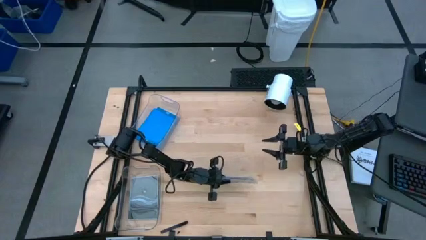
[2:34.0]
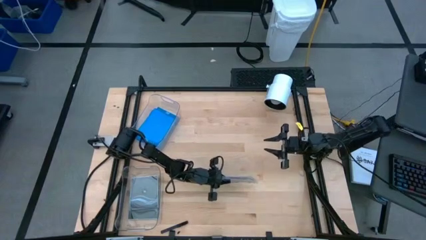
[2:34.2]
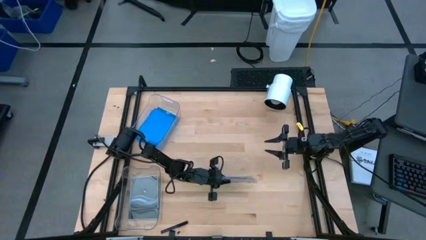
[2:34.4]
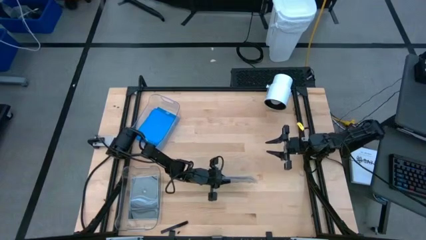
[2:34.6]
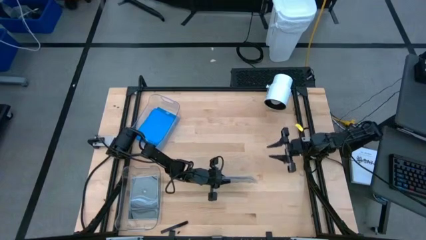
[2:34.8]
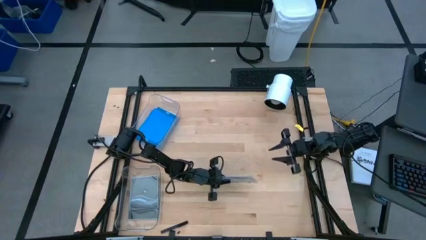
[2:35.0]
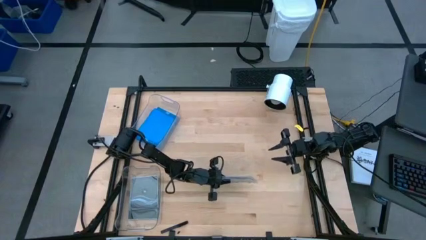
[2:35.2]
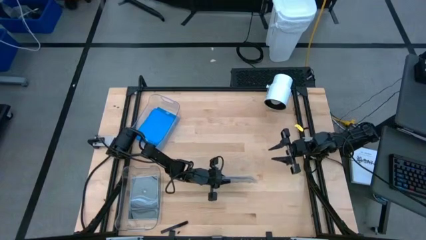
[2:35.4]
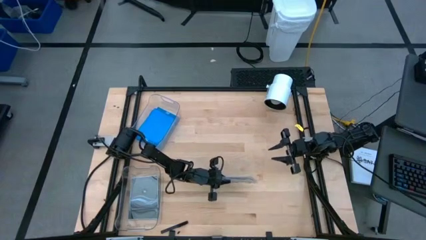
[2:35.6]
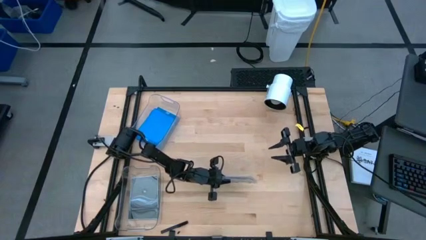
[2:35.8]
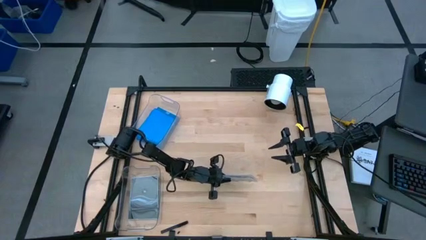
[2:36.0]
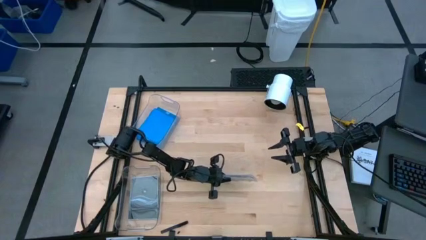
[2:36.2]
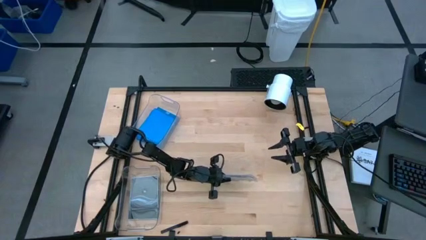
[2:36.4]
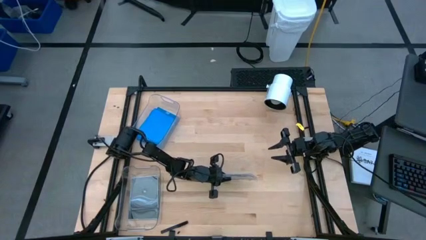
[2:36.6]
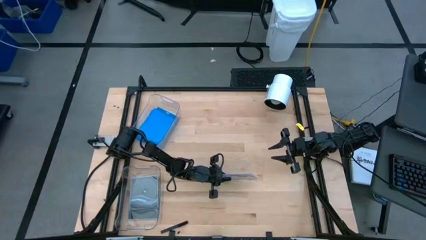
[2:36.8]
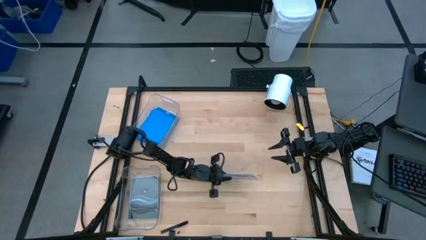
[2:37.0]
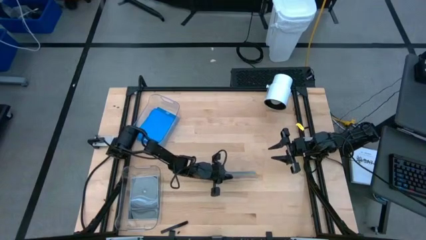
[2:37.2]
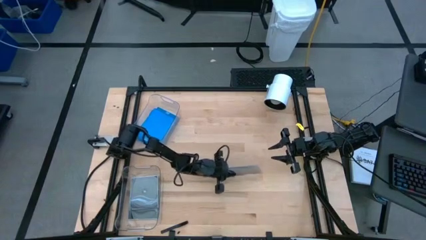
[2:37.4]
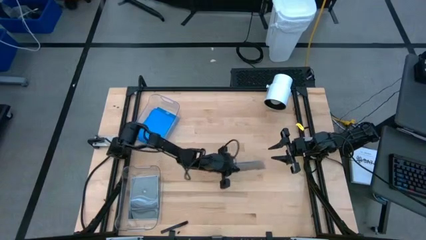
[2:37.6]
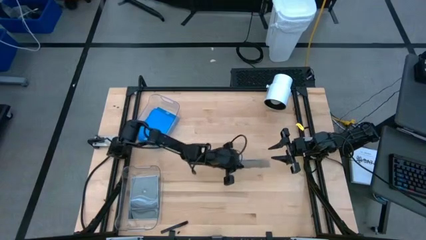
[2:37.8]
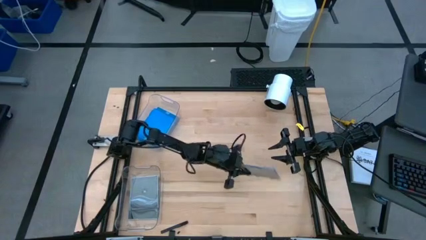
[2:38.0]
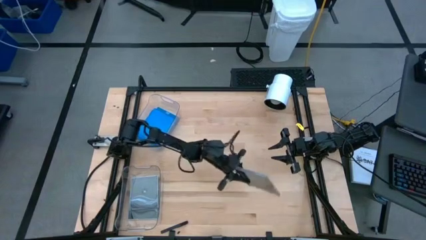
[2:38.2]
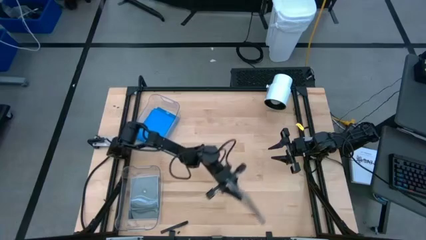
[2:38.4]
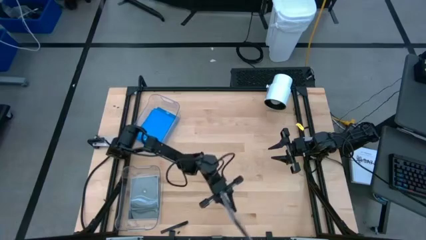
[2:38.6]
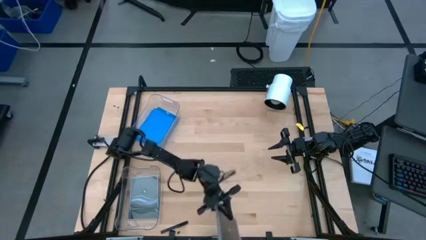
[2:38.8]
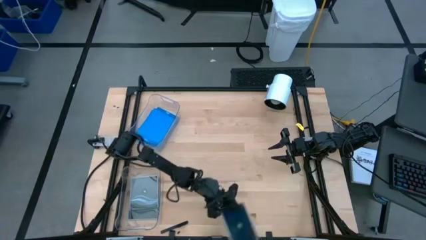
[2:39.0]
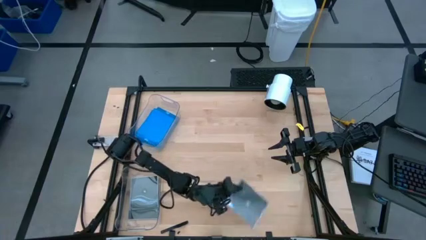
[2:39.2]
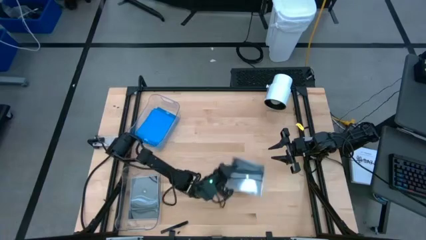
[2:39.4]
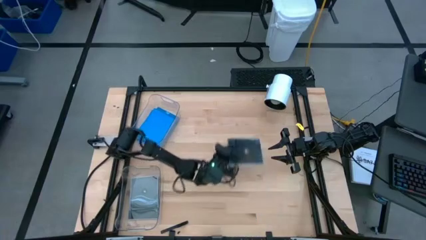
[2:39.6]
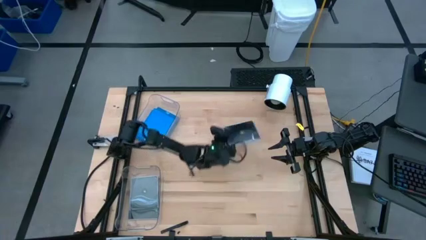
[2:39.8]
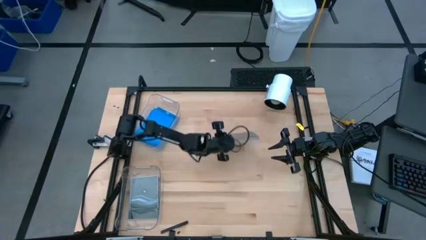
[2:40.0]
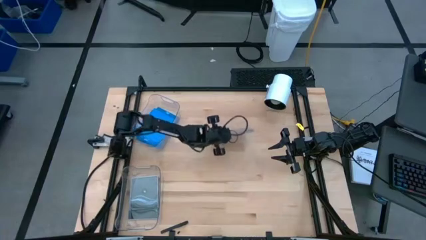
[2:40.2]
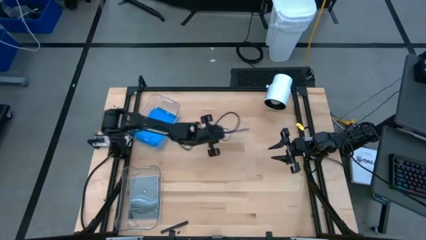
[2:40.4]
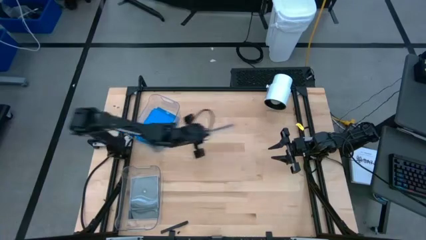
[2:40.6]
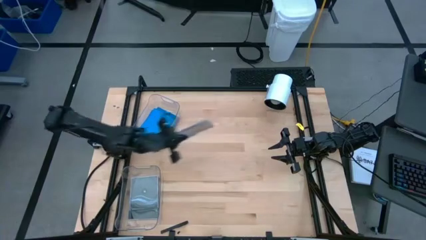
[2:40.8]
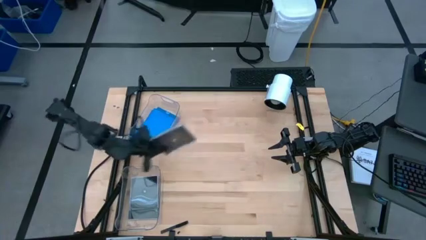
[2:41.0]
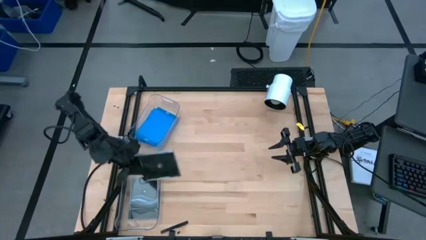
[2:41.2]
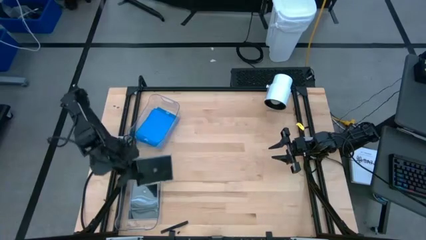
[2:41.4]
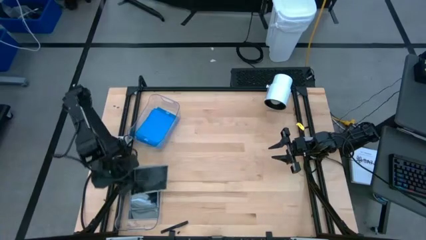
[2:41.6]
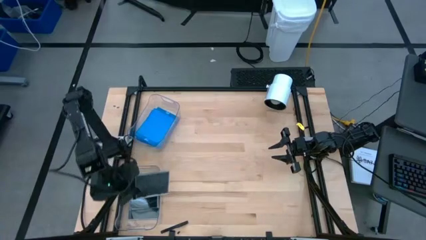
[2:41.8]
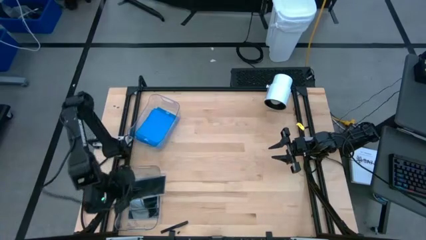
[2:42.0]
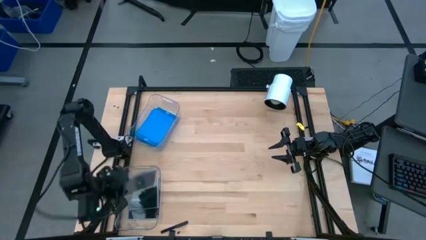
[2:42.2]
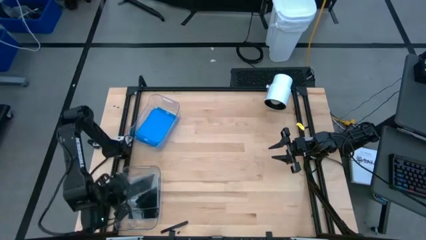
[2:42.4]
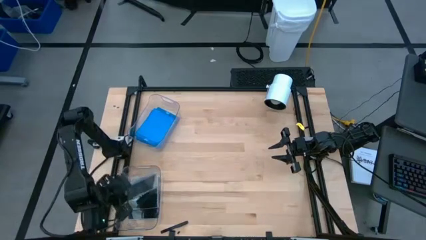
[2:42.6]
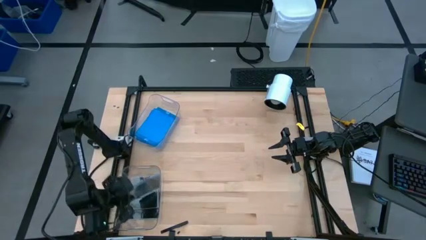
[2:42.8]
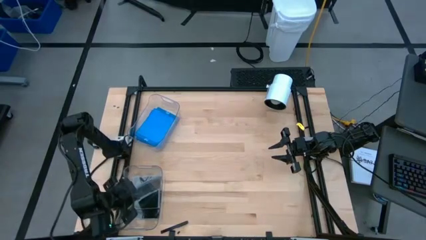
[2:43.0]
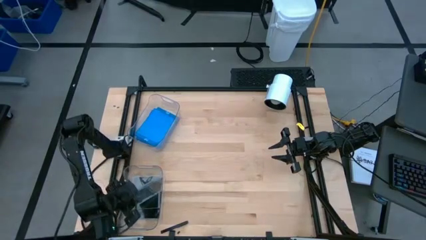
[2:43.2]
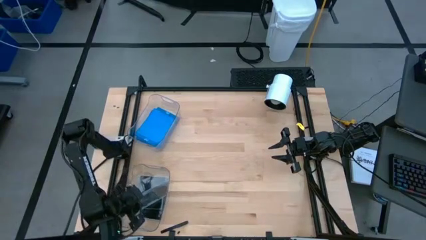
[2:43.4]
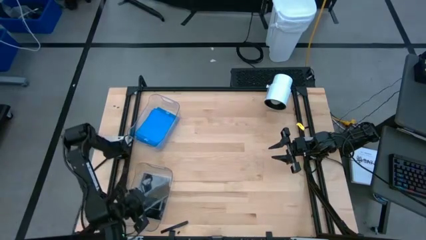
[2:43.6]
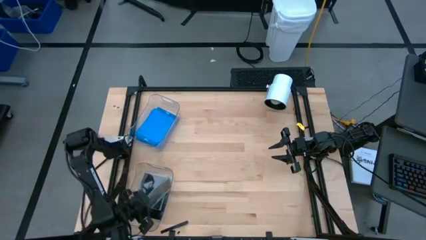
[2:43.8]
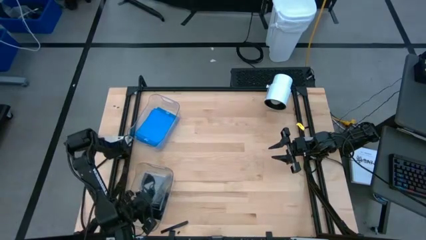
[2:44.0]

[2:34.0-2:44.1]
Task: Pick & place jewel cases by type
Put the black CD case into the bottom transparent bin

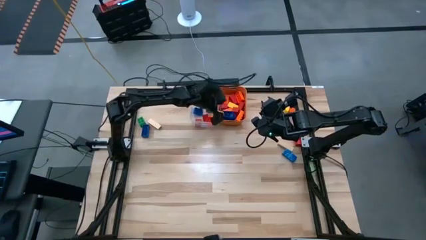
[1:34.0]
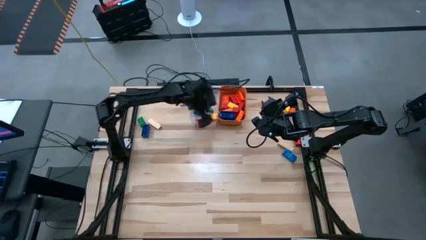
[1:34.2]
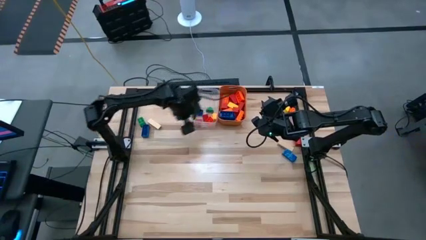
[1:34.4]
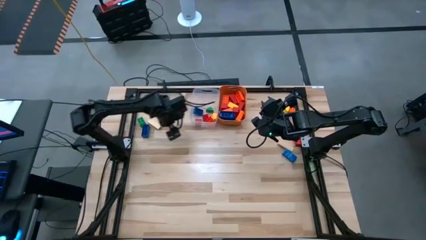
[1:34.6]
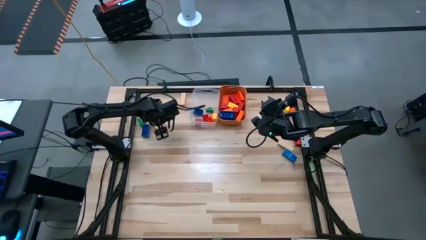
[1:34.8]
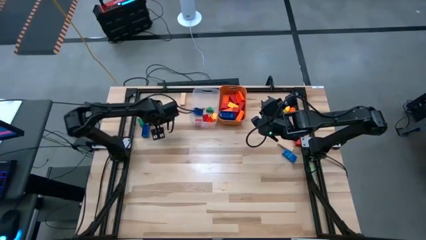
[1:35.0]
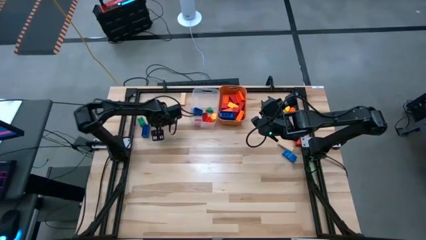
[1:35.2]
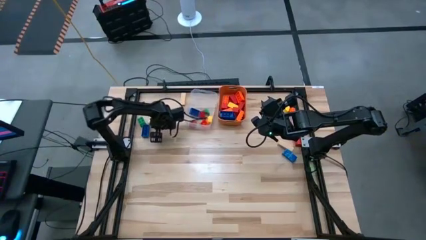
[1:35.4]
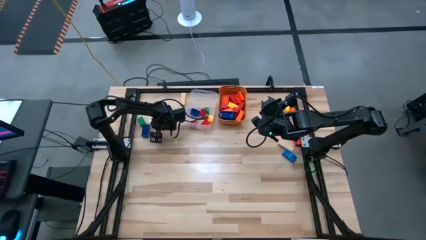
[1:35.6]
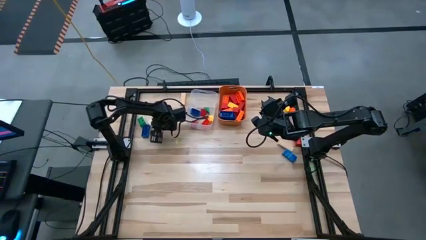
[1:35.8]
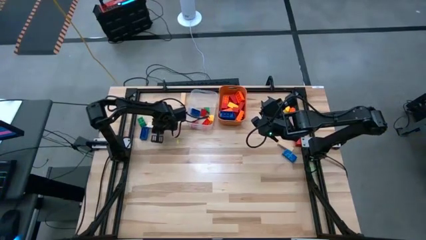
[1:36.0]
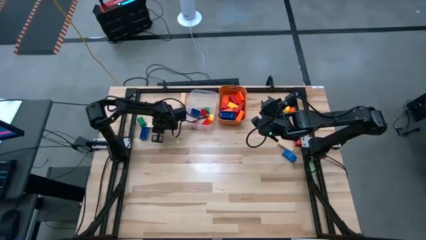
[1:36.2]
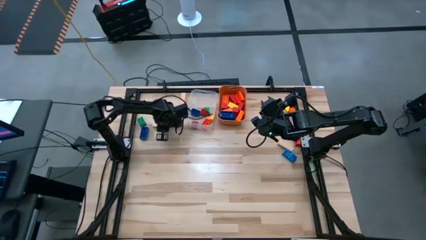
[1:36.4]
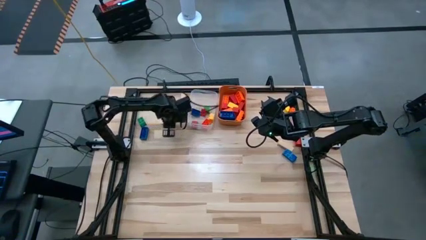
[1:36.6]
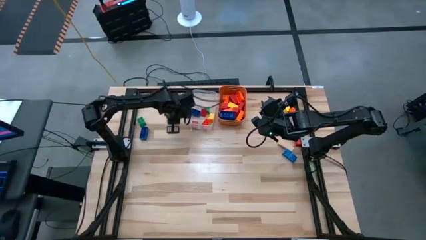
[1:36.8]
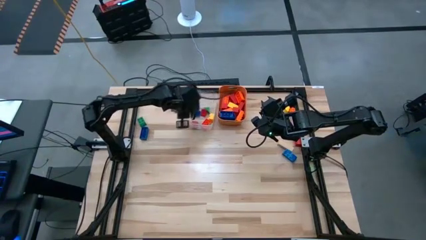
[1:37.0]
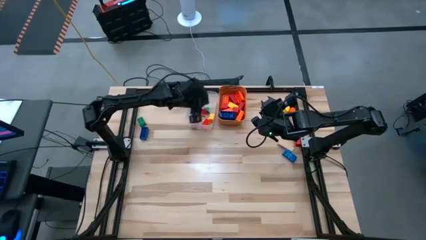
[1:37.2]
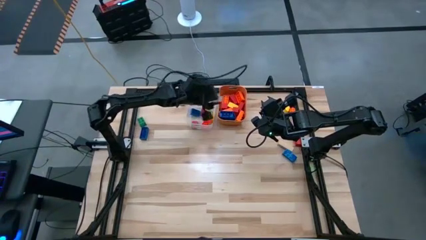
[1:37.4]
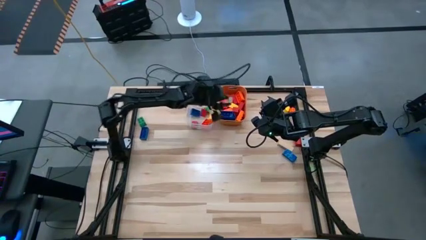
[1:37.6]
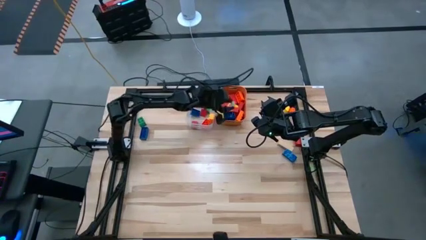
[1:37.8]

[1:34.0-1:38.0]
Task: Sort blocks by size
Put the wood rectangle block into the orange bin

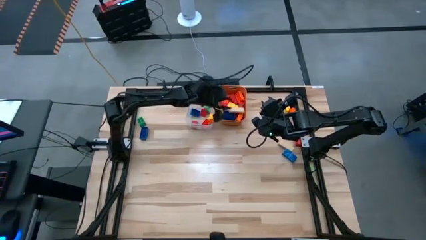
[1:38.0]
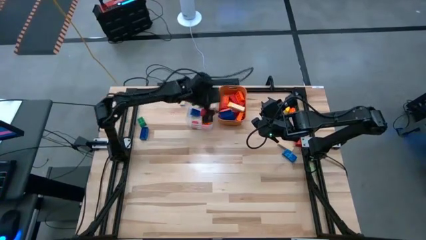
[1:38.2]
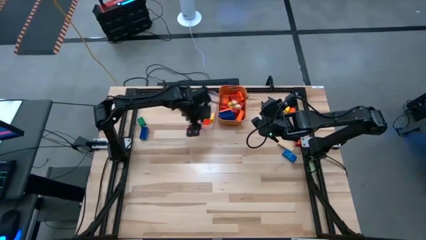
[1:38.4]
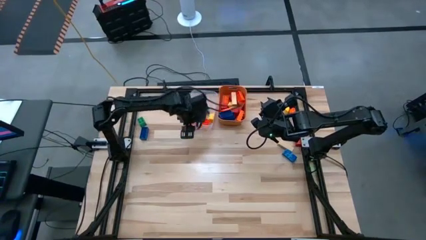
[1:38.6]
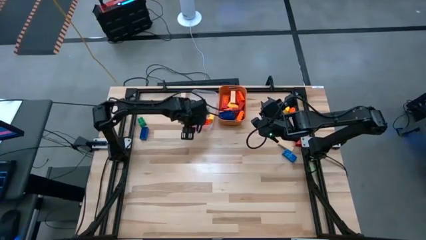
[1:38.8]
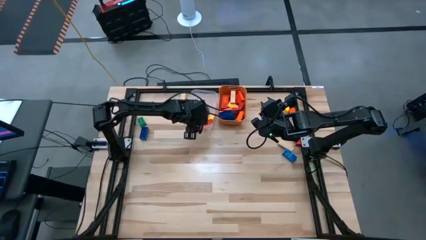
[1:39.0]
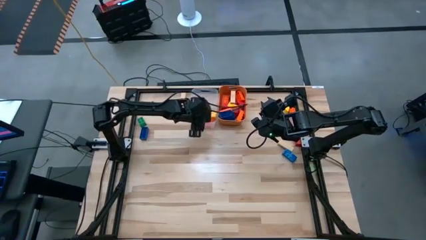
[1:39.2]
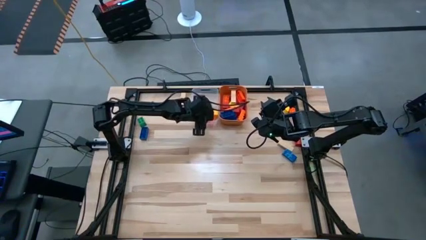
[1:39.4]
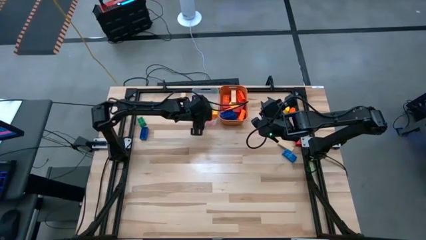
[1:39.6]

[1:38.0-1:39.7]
Move the clear bin on the table
